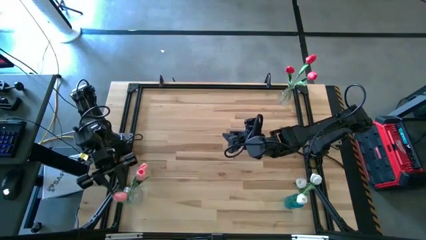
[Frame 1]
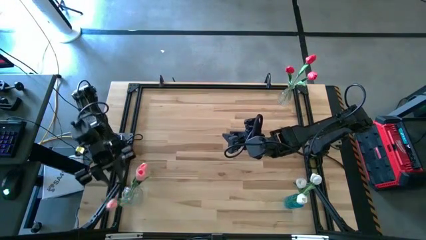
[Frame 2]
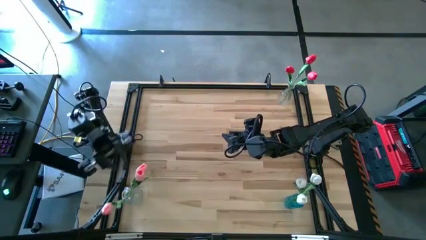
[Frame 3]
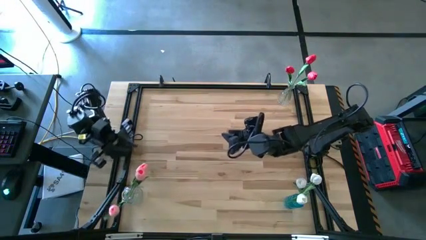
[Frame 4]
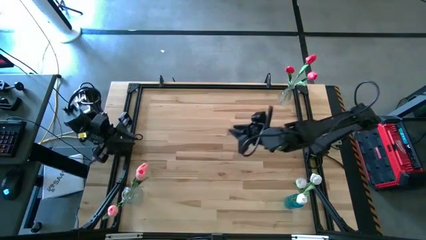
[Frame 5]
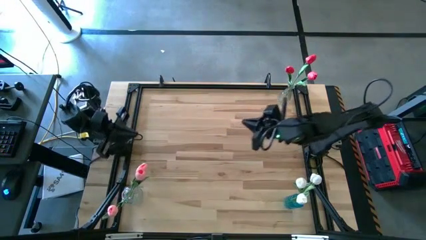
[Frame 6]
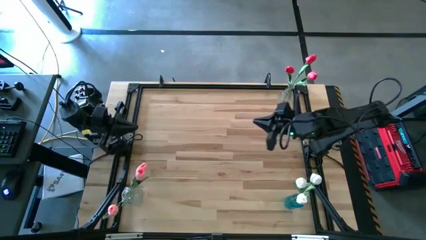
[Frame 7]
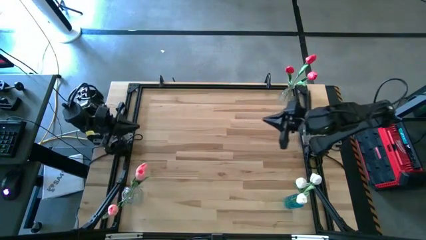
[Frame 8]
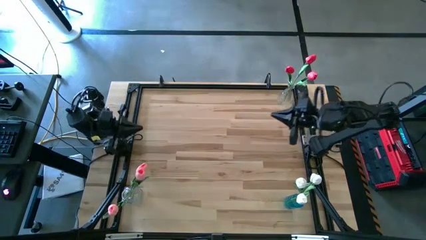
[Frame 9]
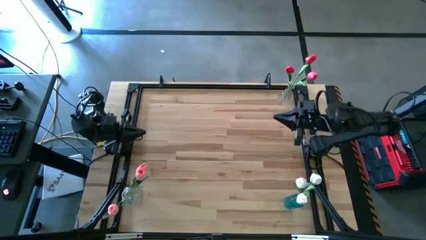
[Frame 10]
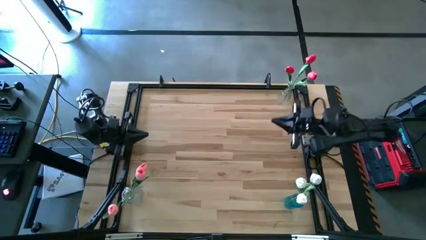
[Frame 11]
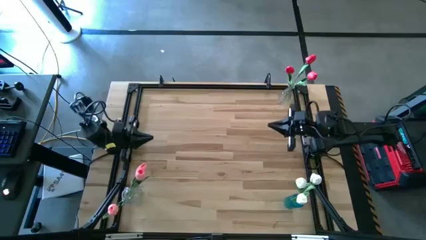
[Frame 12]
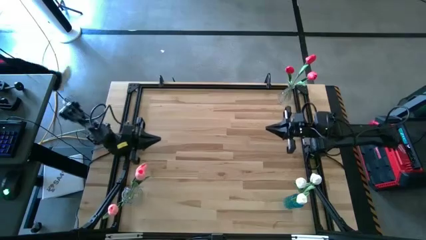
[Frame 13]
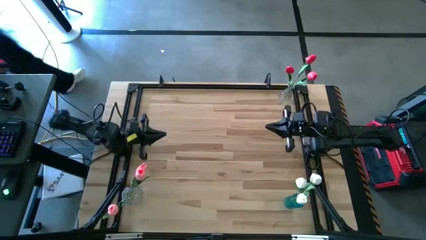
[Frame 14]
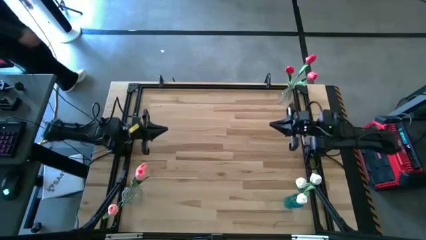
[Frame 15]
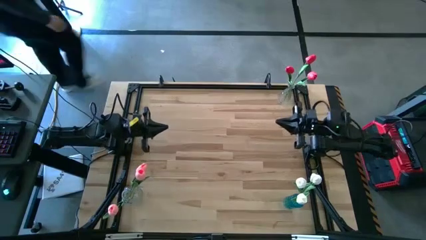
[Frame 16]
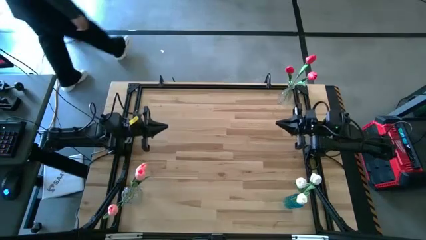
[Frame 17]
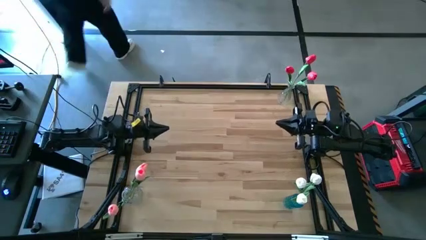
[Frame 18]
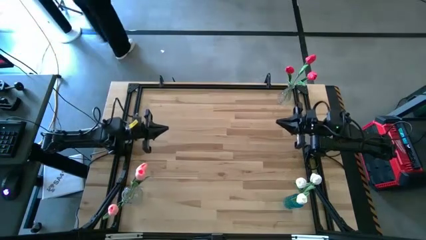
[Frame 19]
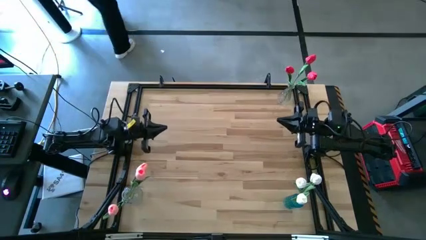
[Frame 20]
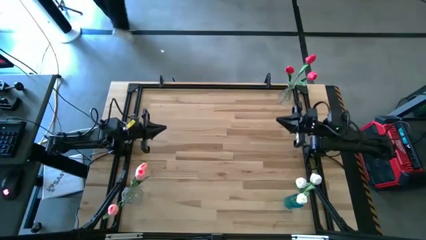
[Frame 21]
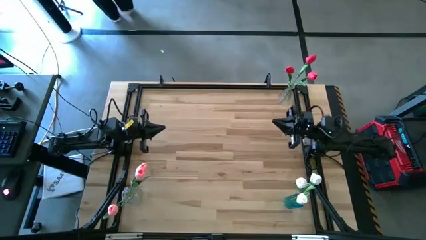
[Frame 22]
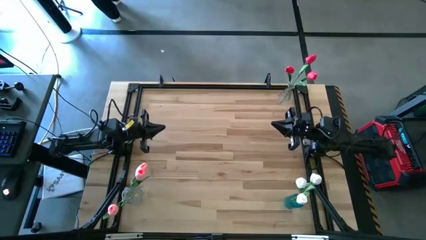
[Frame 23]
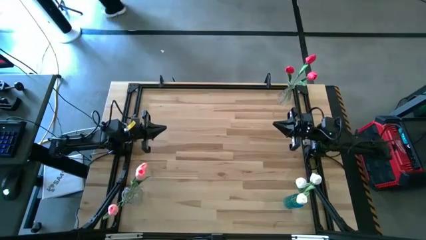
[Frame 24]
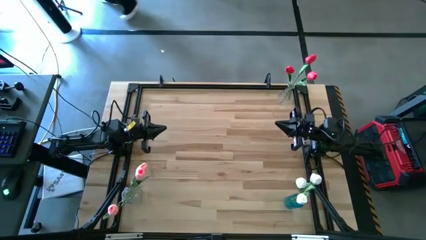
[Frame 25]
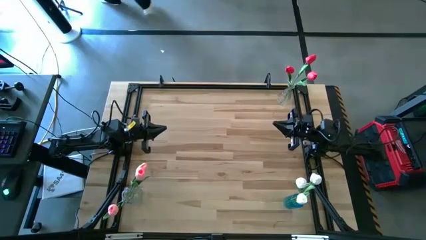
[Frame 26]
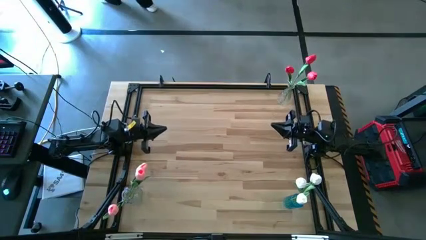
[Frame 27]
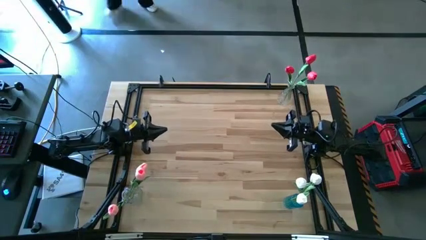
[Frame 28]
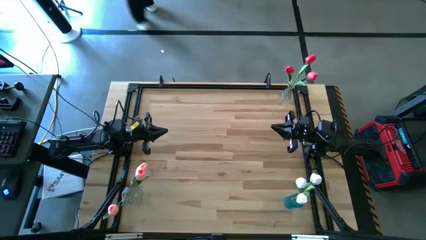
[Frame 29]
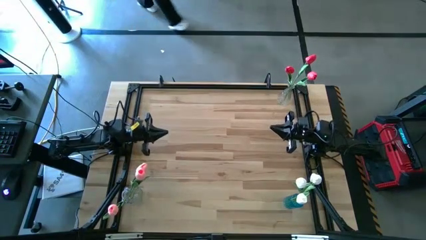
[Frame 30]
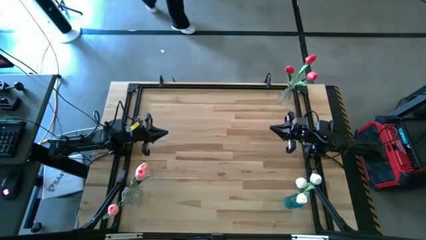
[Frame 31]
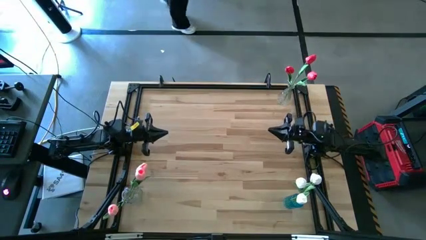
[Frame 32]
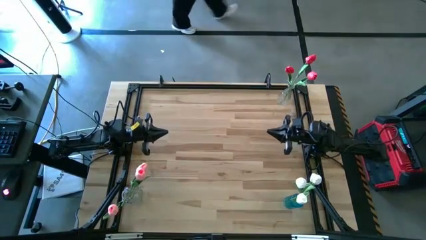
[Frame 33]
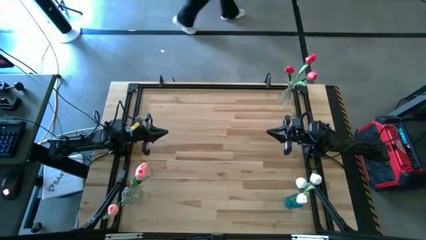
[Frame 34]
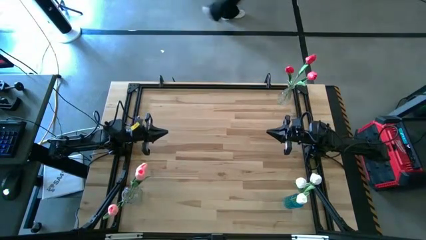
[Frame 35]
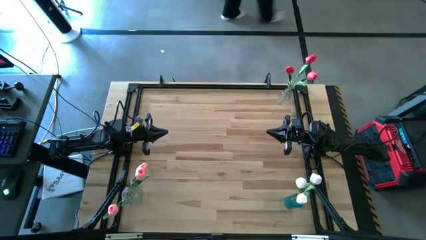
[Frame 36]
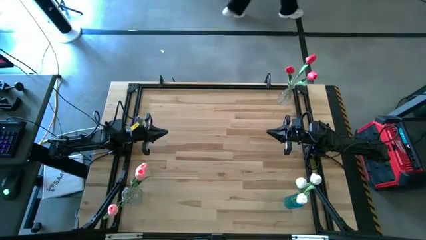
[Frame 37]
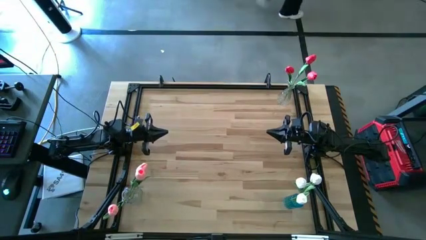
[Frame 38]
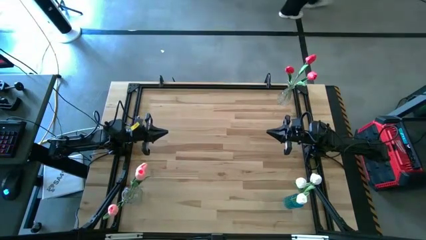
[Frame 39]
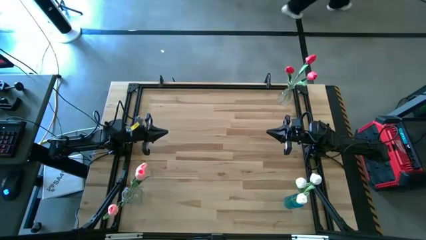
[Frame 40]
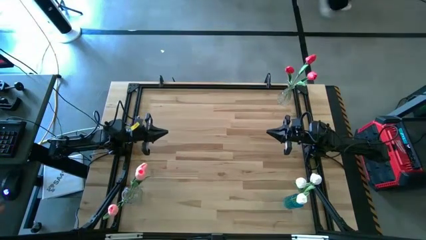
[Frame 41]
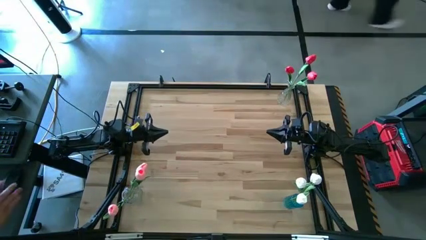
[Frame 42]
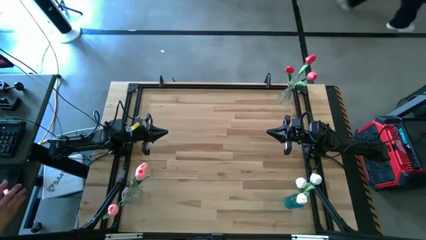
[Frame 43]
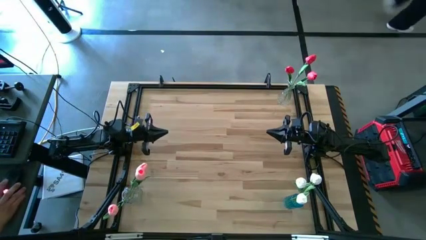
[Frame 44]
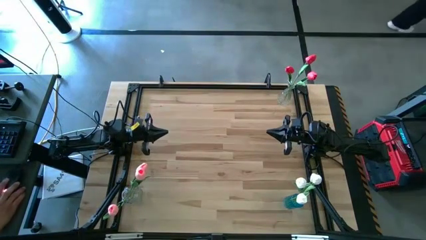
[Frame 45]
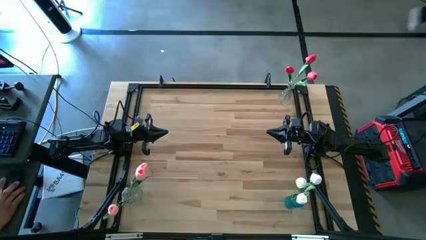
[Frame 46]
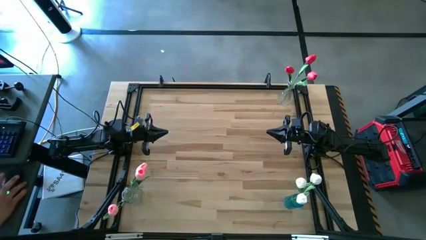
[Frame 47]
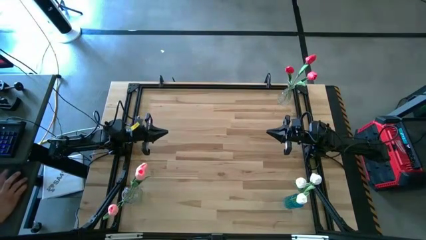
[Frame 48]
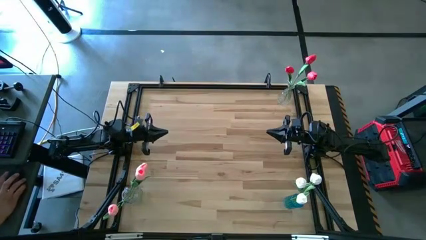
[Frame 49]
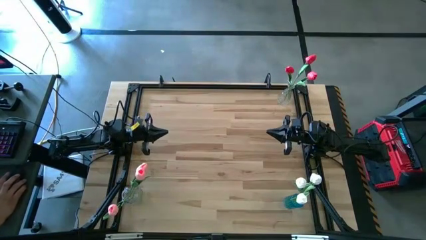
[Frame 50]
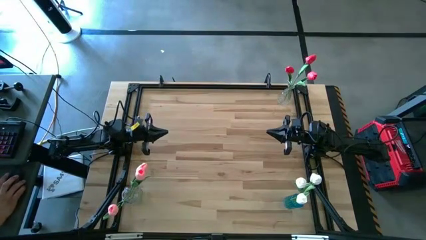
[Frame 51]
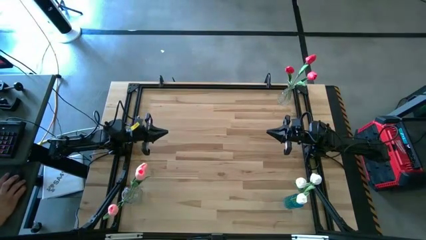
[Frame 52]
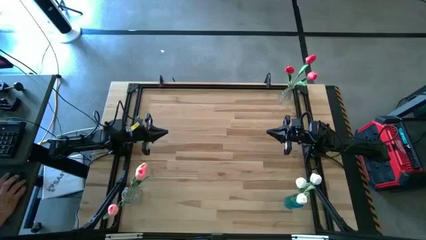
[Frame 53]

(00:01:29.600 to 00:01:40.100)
Task: Sort flowers into vase by color
Return to Home Position

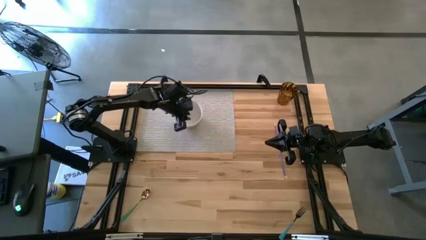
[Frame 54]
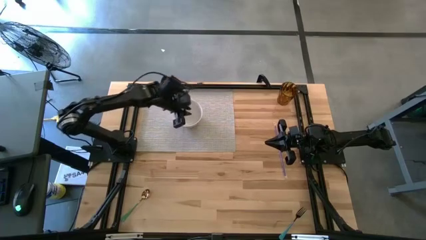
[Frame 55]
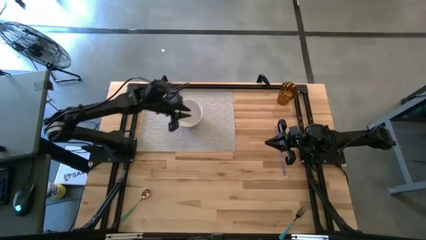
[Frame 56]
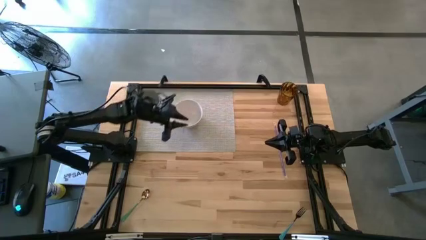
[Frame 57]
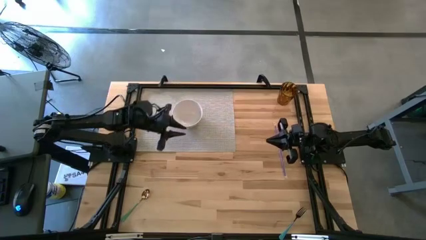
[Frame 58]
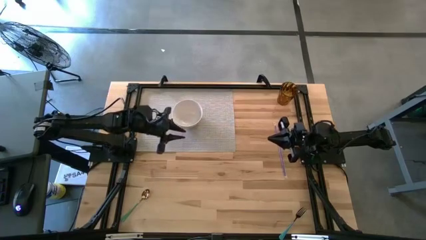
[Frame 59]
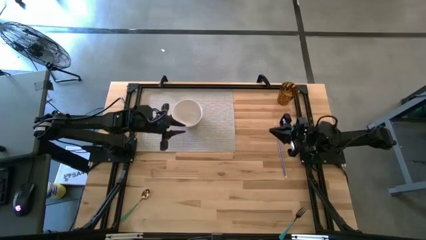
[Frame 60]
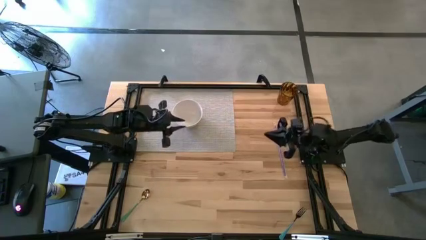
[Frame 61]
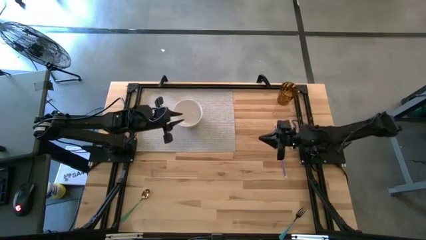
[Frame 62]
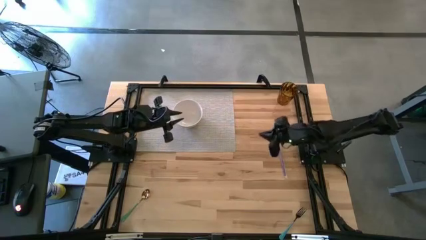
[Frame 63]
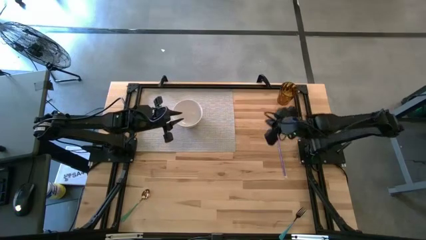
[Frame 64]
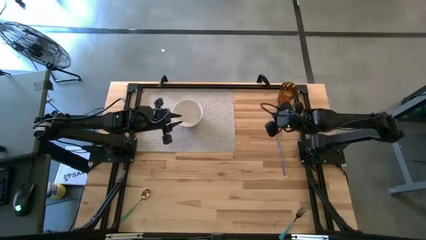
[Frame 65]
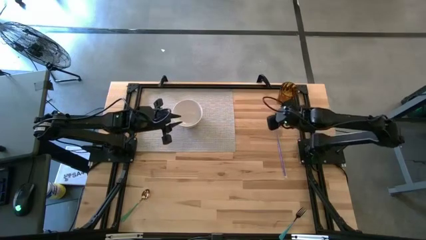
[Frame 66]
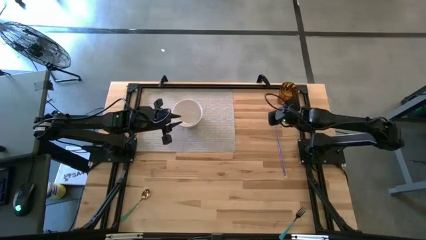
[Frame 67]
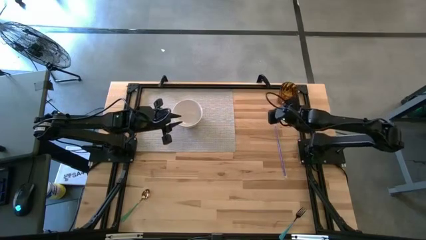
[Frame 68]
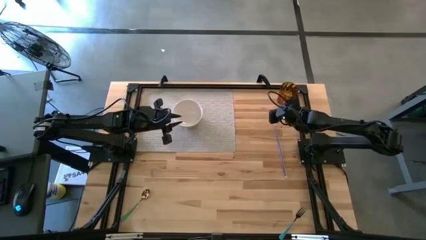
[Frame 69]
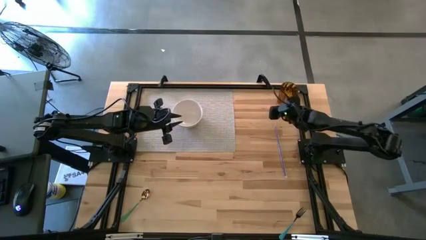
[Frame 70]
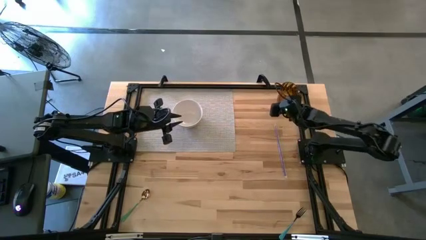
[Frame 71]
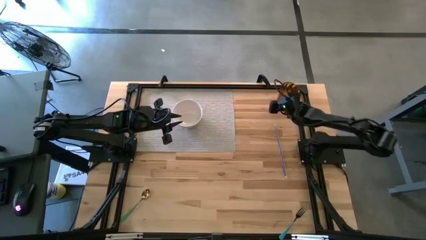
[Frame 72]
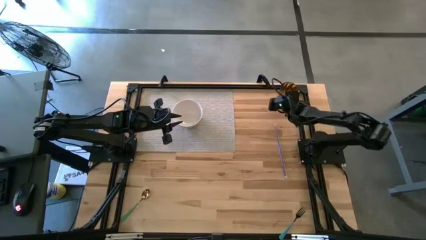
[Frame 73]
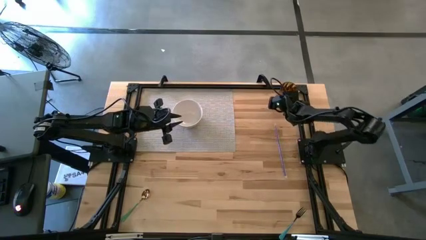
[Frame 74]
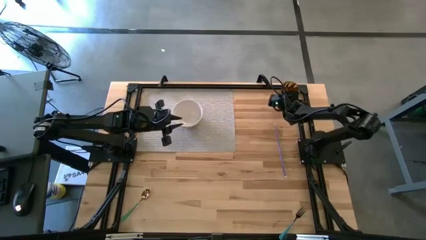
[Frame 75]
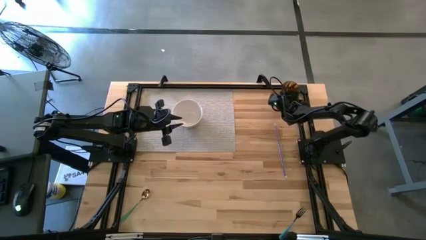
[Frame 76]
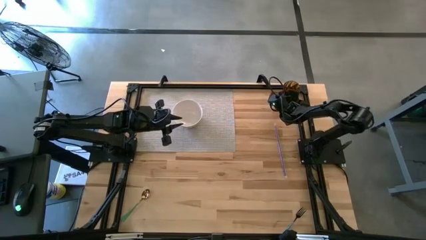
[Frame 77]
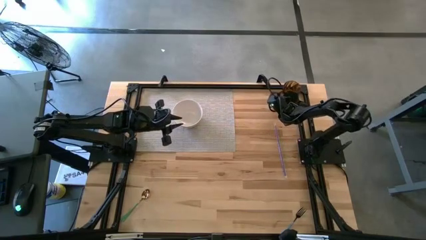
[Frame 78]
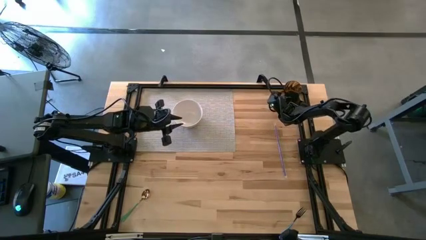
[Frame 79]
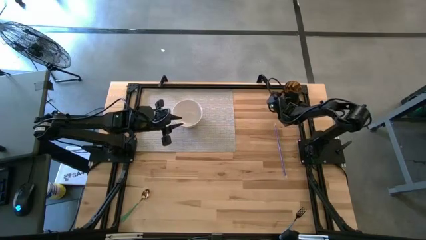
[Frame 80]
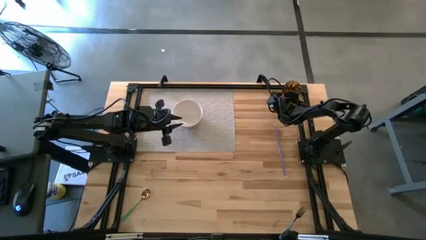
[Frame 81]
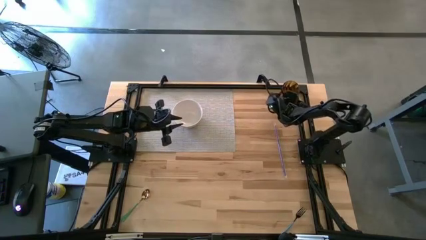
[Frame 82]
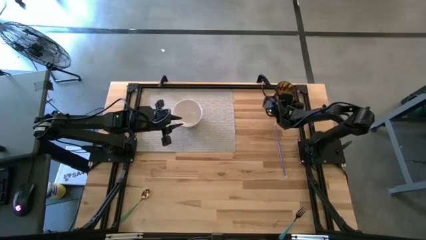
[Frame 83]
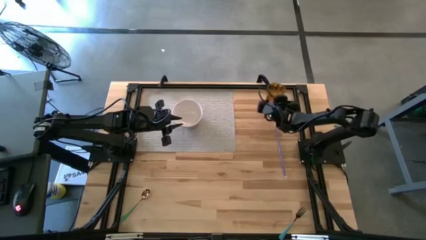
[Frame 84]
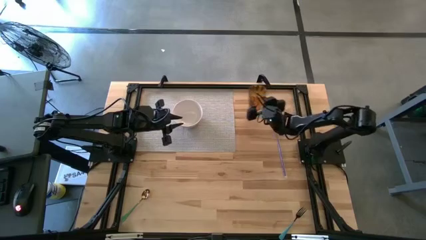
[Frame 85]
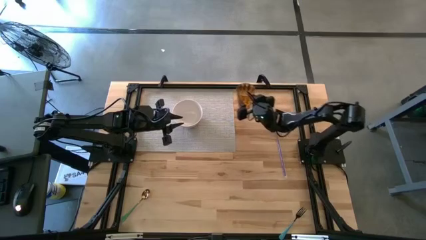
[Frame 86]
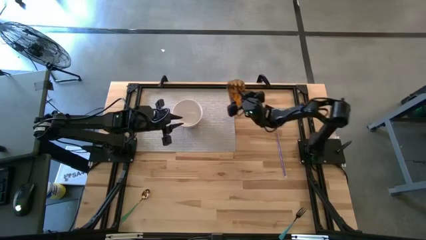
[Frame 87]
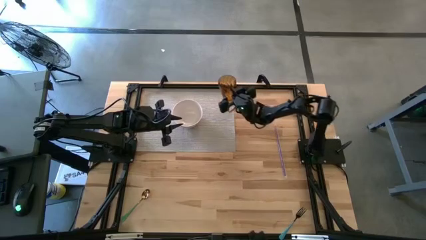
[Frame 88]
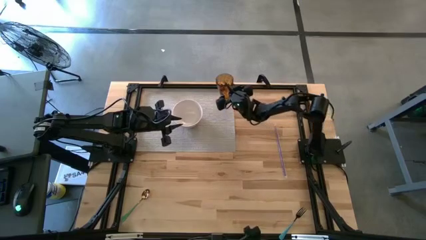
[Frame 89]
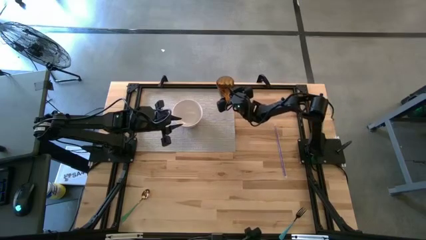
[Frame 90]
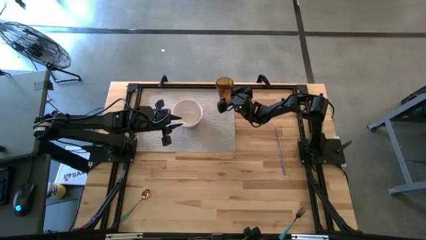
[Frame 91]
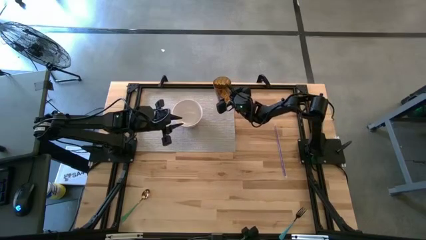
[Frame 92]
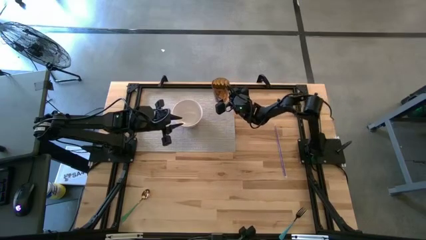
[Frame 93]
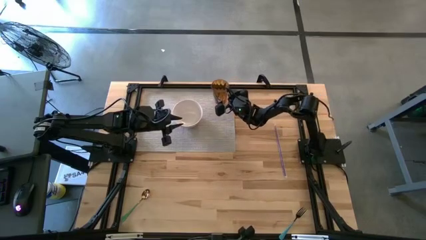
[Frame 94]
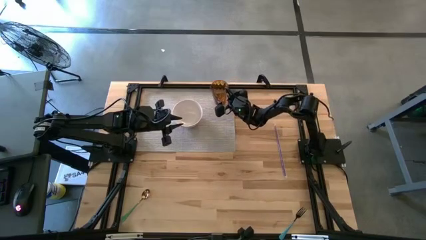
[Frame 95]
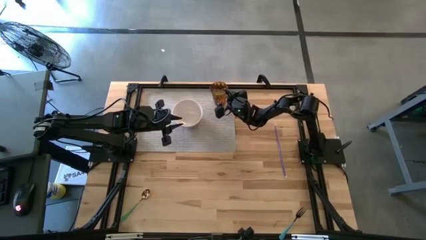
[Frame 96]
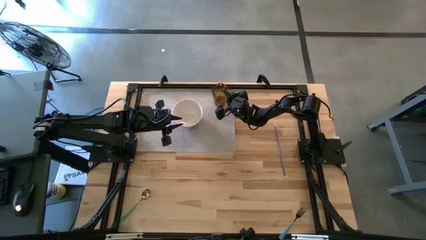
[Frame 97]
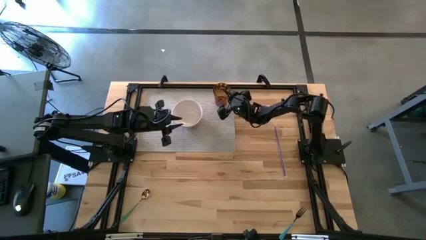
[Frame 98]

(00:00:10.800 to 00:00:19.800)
Task: Pick & Place Utensil
Put the brown cup on the top right of the white bowl
